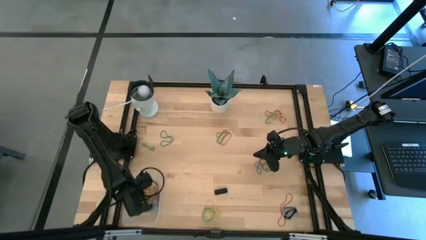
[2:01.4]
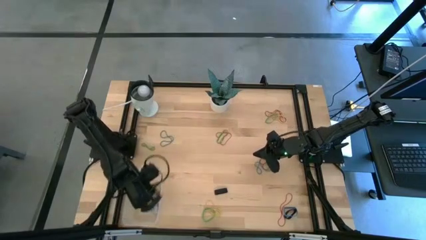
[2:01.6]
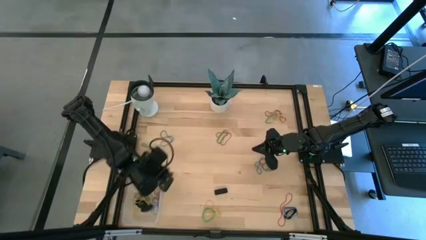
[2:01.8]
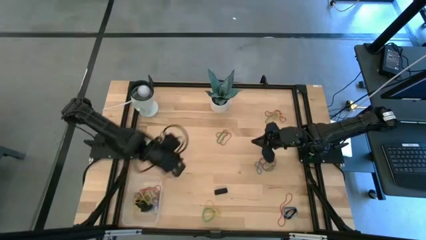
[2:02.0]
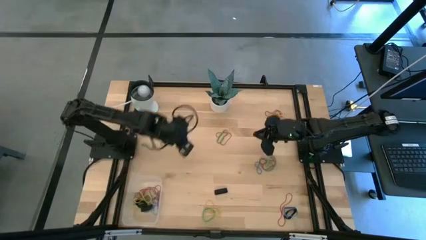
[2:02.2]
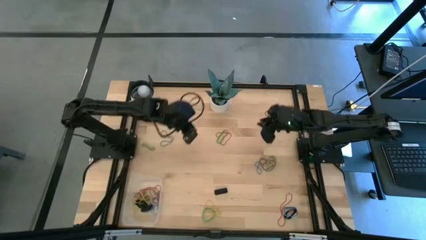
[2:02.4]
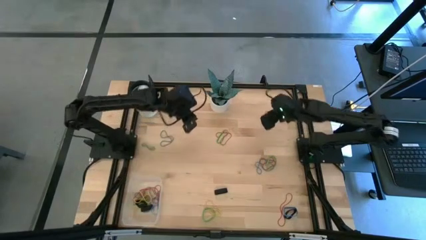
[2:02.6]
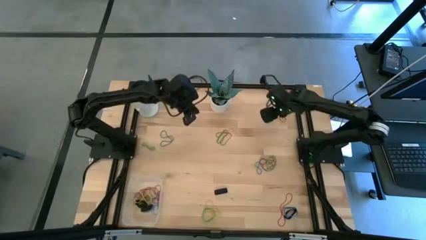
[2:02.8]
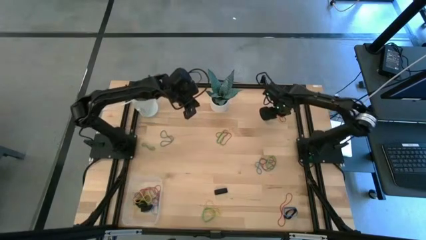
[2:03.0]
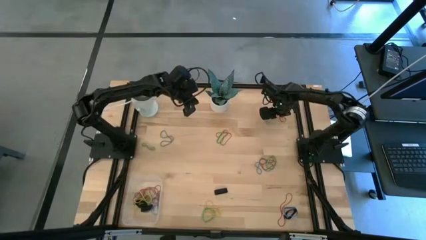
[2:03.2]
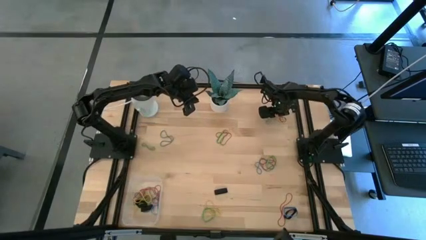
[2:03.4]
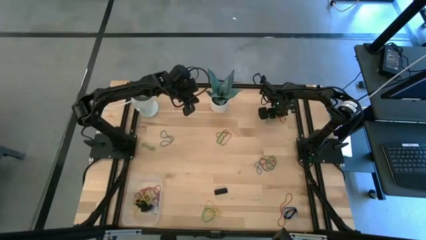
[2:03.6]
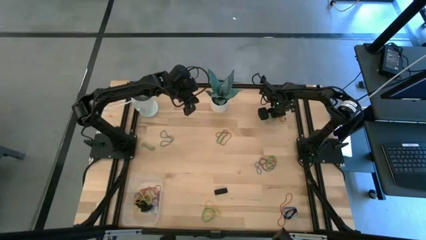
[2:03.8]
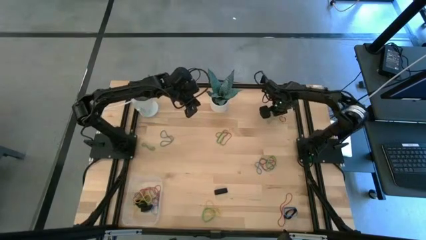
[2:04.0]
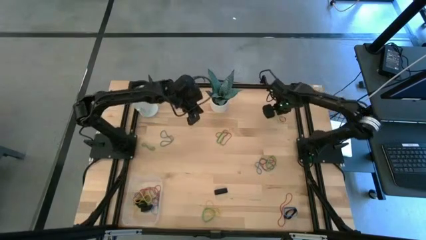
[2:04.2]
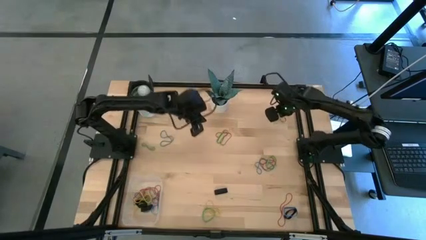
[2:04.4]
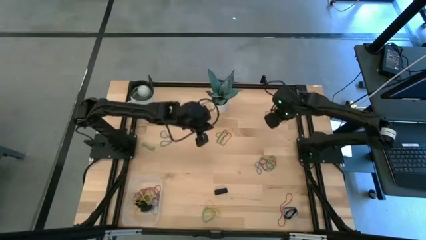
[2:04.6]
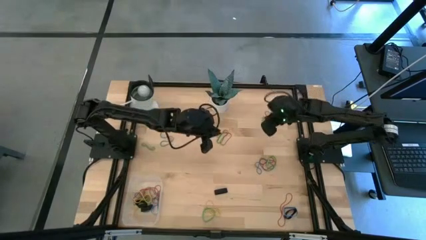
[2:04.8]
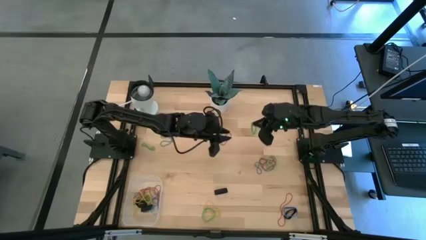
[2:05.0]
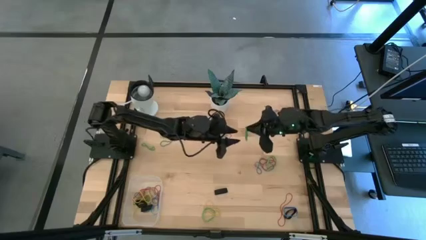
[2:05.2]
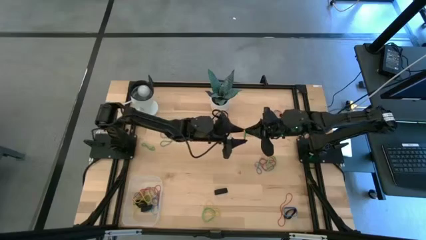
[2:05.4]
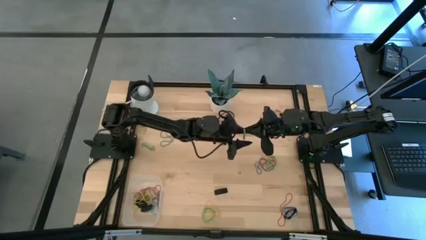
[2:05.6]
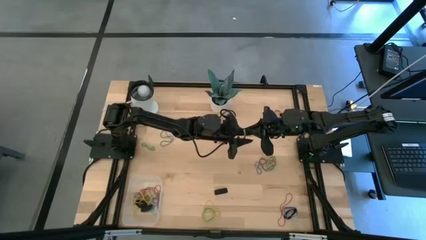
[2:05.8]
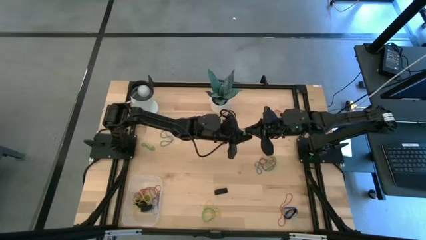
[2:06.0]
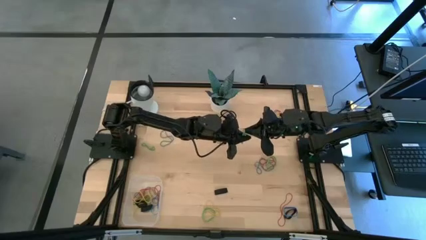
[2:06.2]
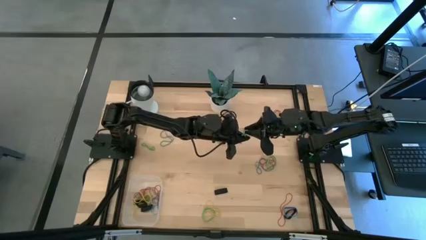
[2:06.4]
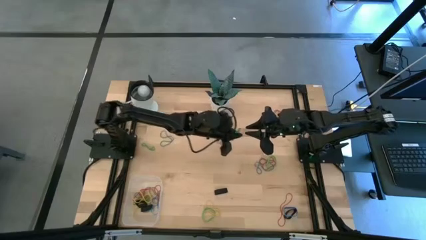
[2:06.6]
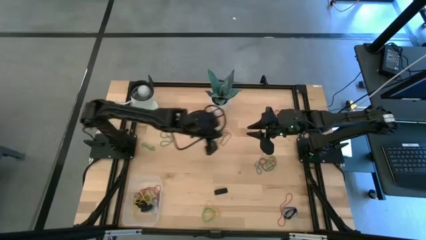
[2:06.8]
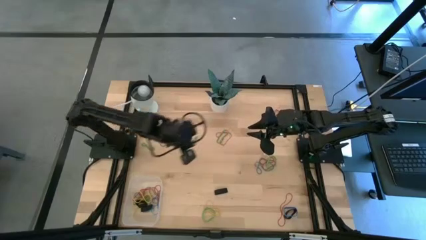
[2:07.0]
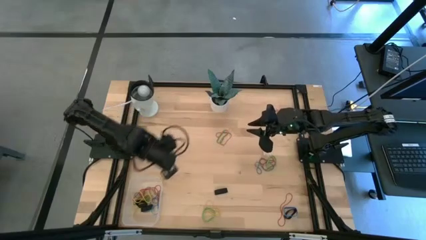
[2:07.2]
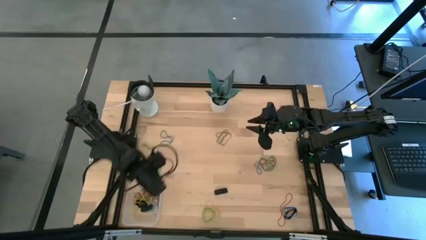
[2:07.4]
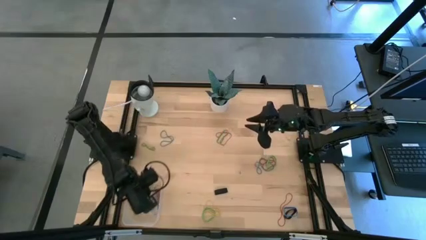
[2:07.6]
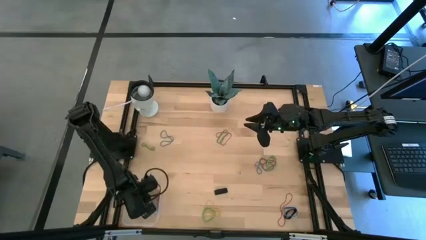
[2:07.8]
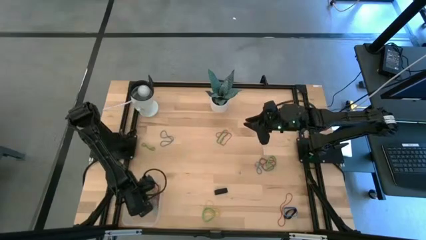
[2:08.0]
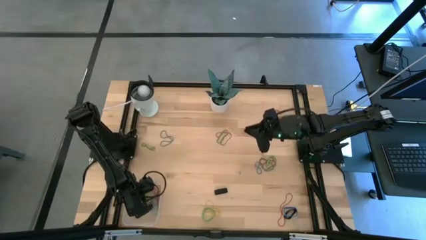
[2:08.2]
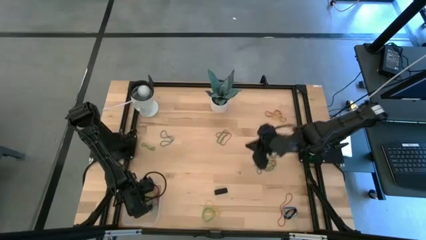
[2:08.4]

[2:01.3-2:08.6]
Task: Pick and place rubber bands into bin
Put the green rubber band into the transparent bin

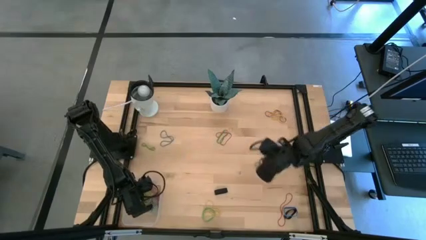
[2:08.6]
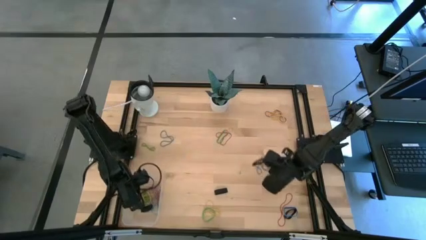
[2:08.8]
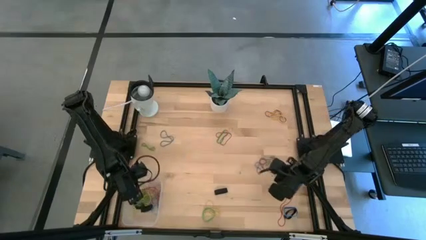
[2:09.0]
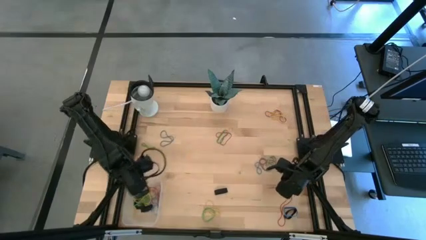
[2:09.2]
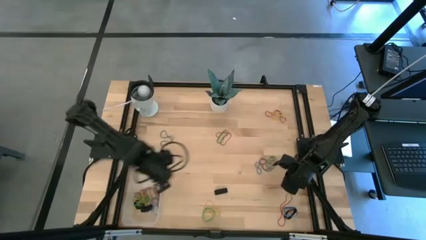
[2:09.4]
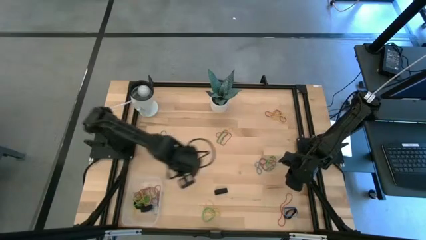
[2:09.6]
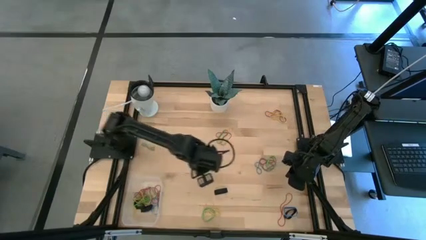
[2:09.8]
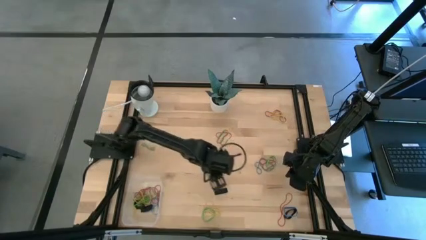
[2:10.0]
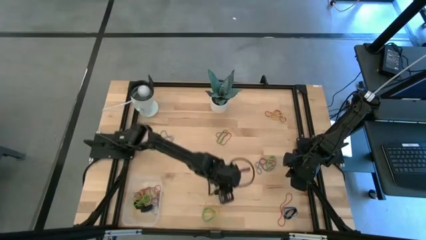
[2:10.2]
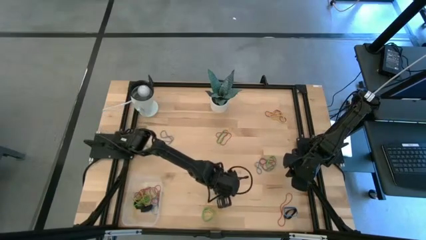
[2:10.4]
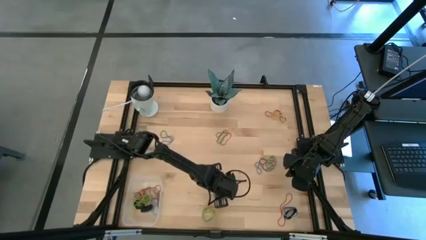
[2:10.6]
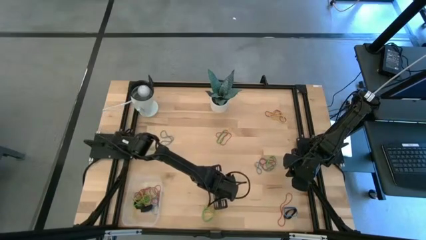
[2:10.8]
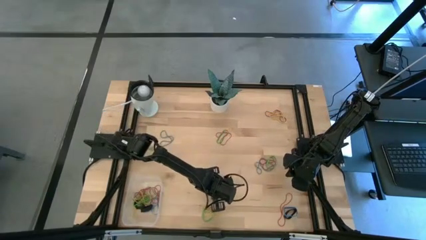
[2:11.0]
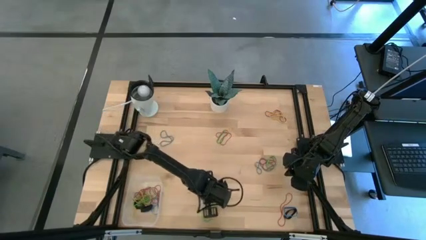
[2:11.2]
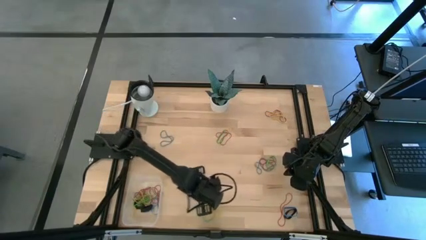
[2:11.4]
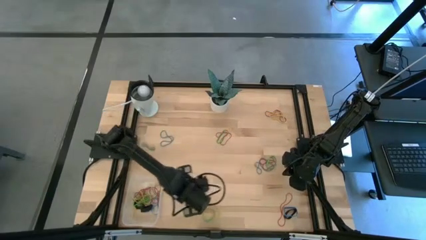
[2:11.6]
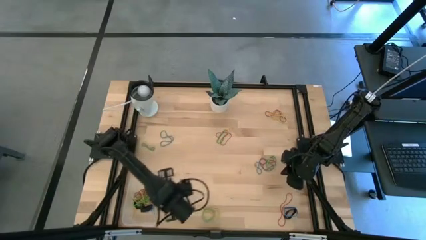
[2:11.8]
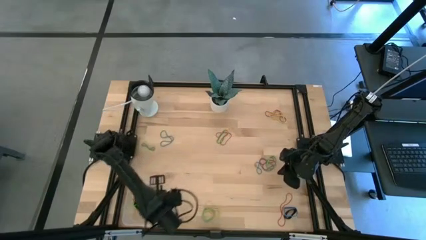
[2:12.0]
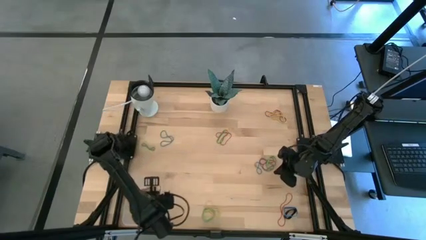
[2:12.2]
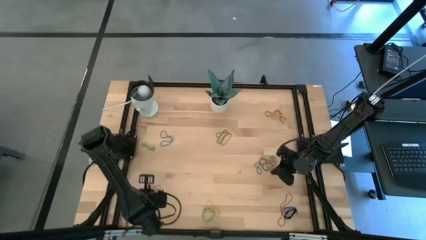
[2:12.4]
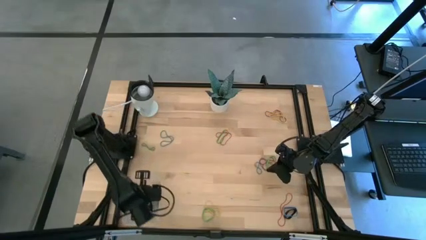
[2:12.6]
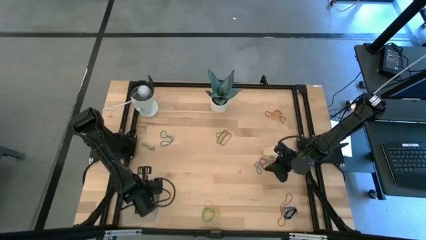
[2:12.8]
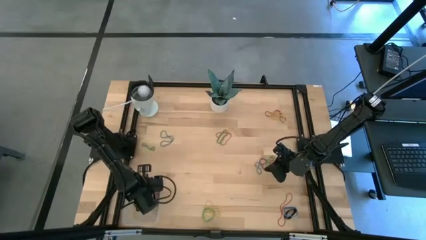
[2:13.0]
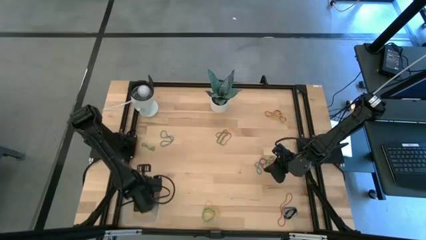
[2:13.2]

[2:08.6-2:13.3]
Put the black rubber band into the transparent bin

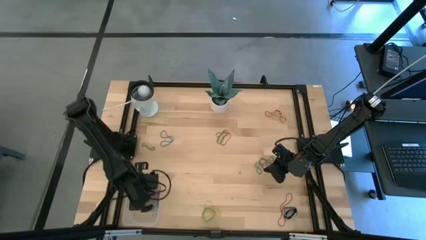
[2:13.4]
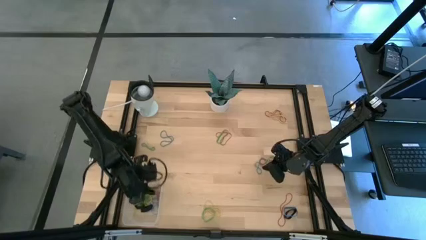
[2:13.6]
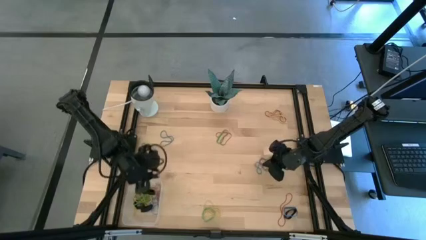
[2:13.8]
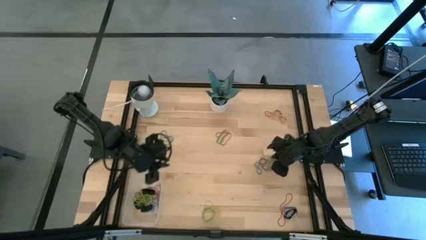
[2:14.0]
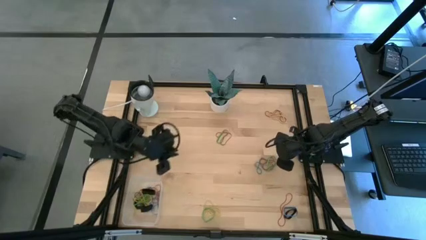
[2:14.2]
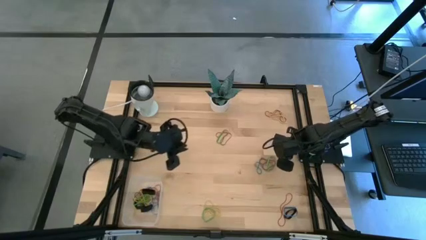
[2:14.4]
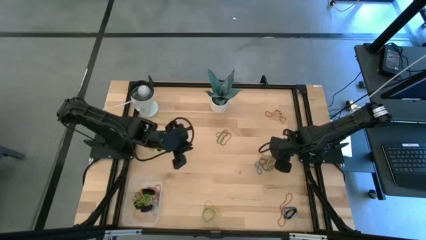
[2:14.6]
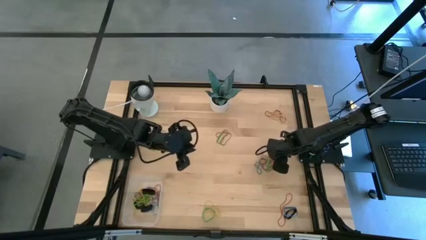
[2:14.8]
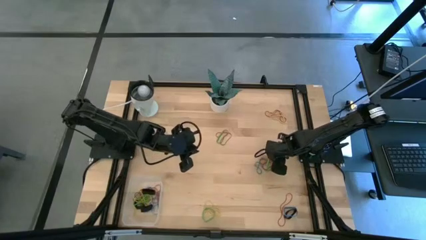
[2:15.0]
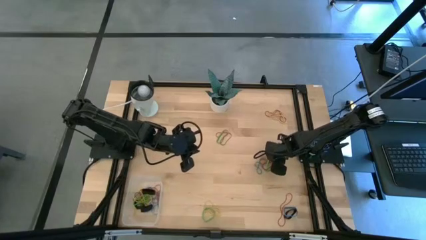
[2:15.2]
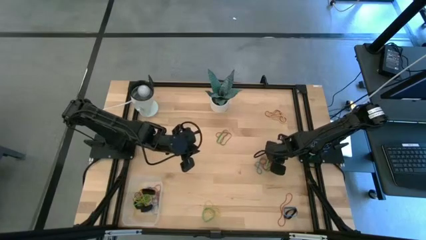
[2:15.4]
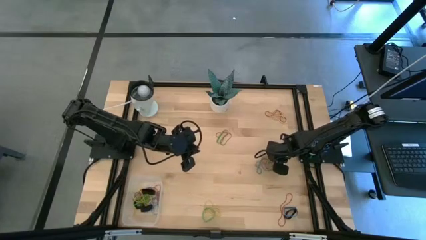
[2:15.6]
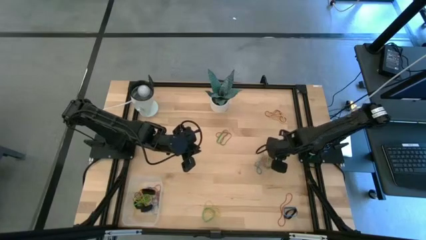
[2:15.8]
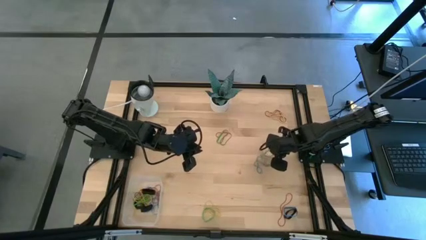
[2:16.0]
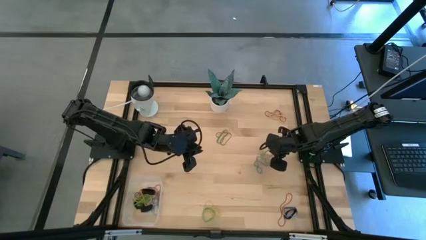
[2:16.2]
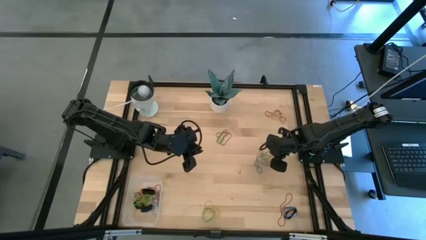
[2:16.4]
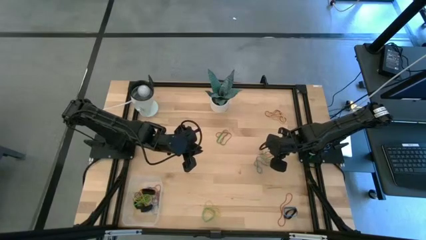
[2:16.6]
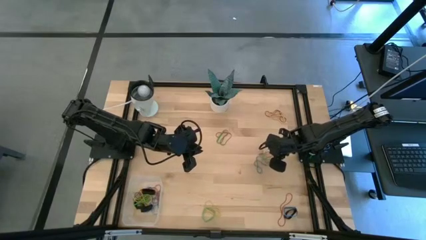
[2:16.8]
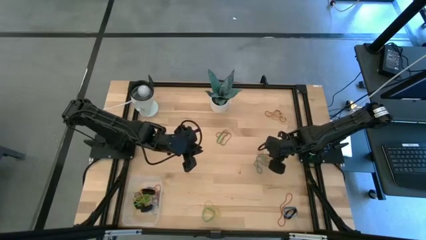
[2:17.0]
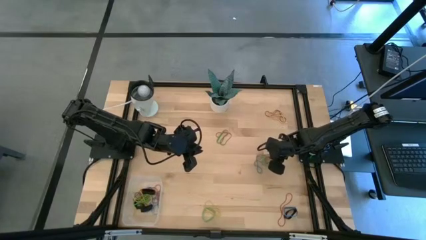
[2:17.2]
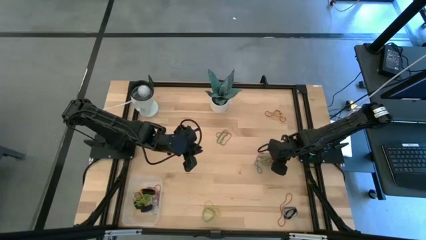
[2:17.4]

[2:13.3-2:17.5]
Put the red rubber band into the transparent bin

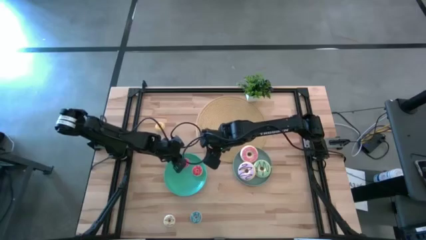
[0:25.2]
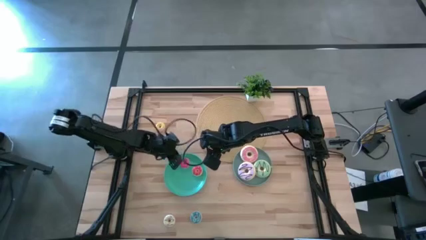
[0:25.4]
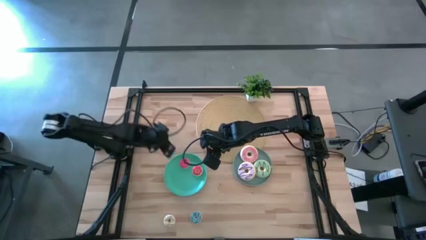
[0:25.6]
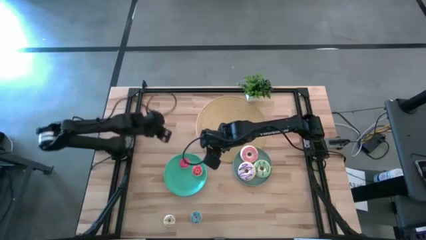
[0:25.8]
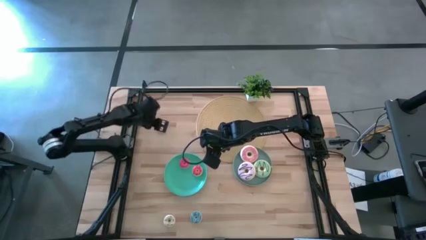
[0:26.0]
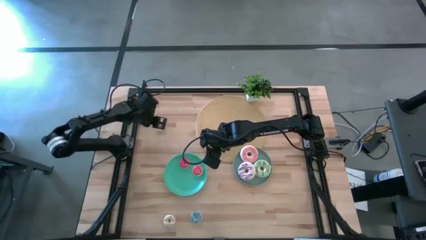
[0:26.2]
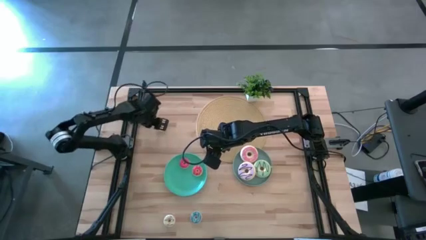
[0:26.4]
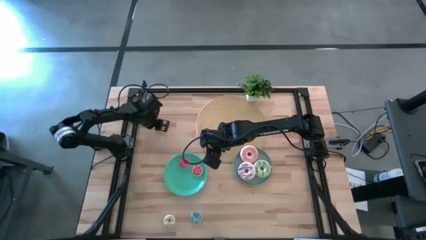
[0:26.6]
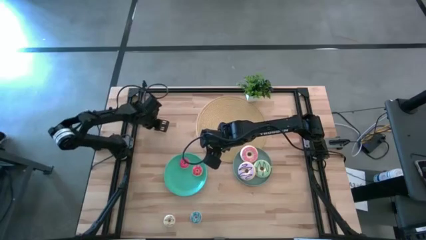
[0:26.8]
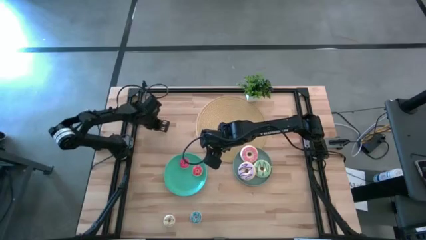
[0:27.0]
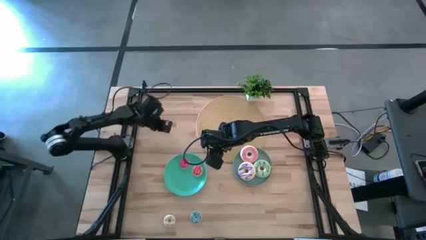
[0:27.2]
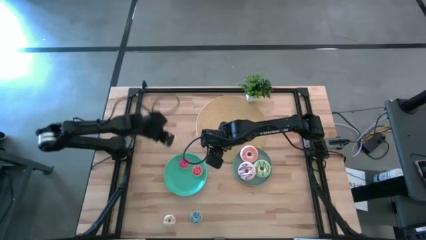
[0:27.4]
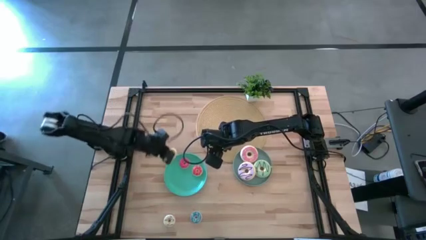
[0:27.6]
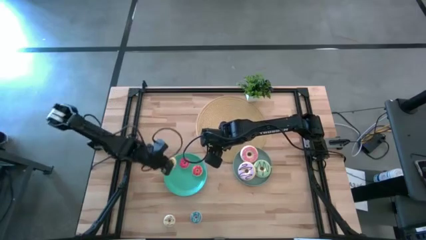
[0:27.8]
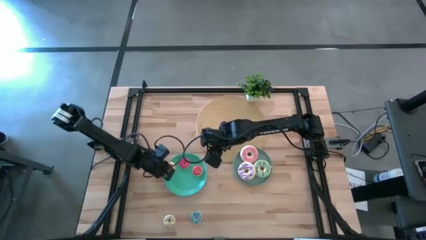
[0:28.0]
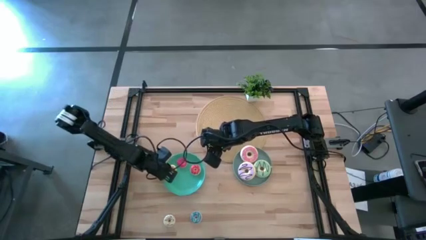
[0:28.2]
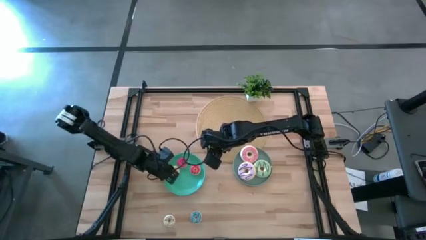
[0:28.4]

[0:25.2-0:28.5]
Task: Pick & Place donuts
Put the small yellow donut on the light green plate
